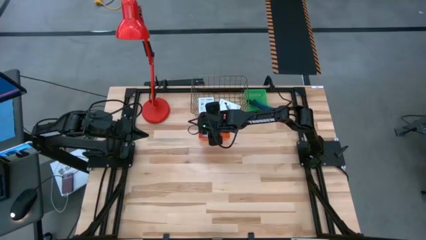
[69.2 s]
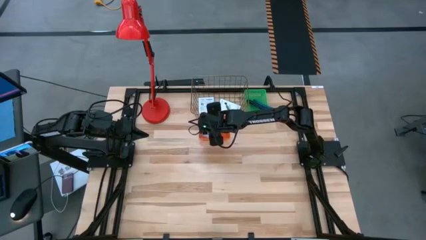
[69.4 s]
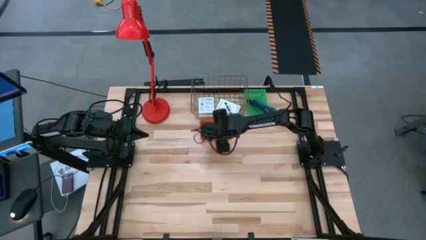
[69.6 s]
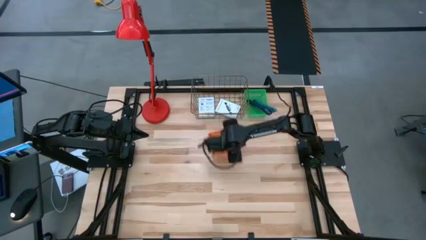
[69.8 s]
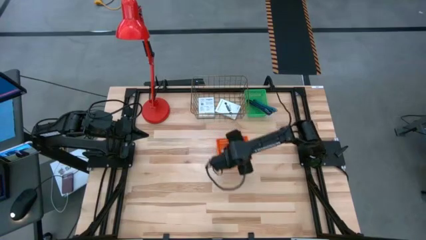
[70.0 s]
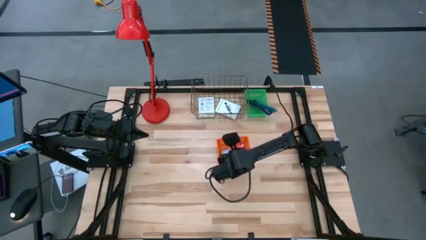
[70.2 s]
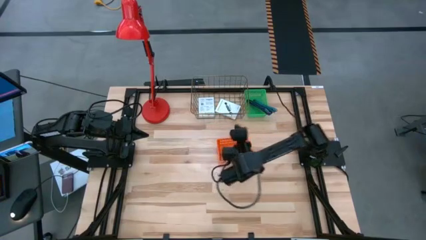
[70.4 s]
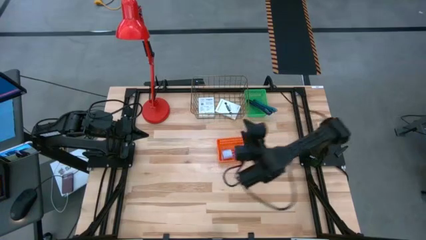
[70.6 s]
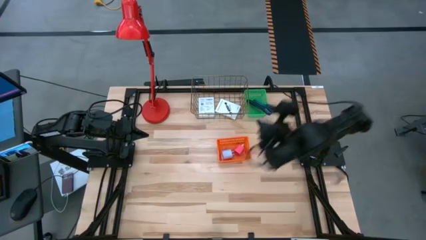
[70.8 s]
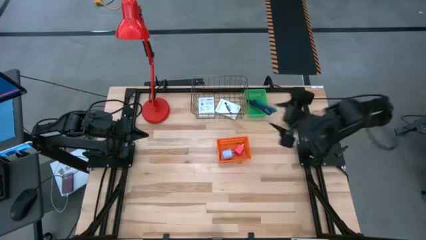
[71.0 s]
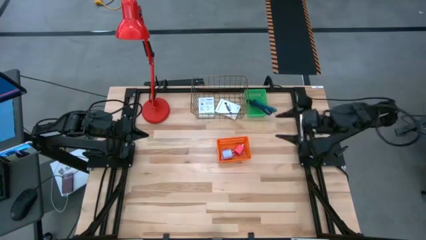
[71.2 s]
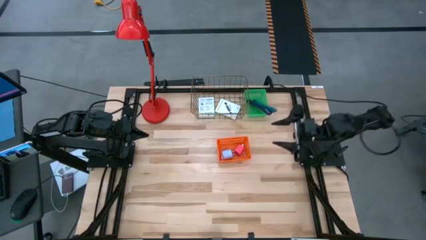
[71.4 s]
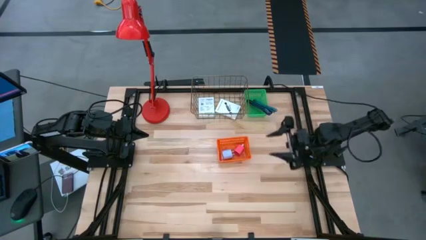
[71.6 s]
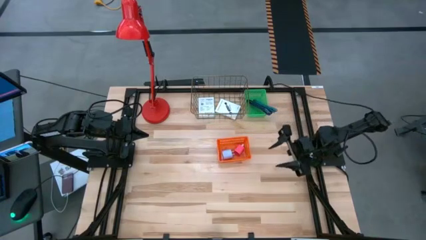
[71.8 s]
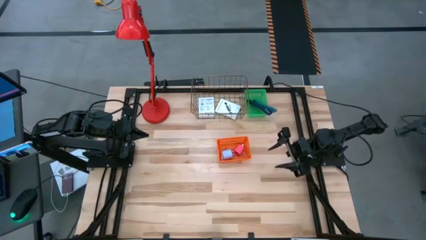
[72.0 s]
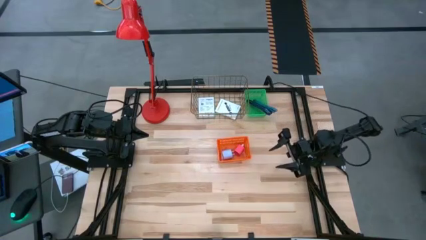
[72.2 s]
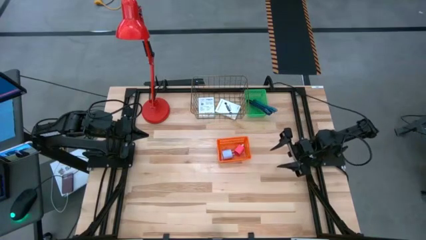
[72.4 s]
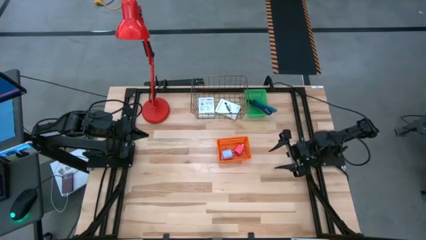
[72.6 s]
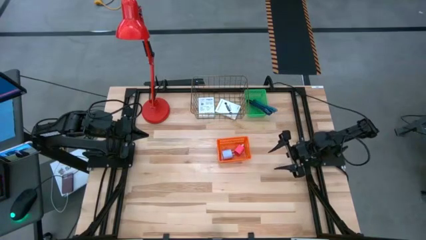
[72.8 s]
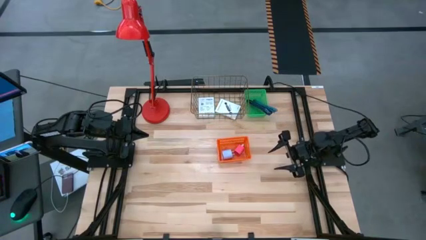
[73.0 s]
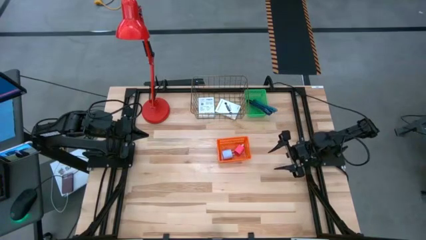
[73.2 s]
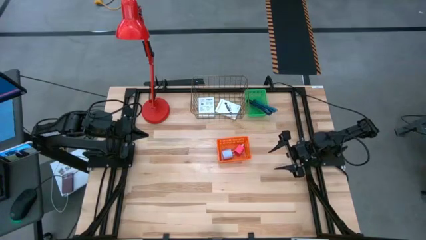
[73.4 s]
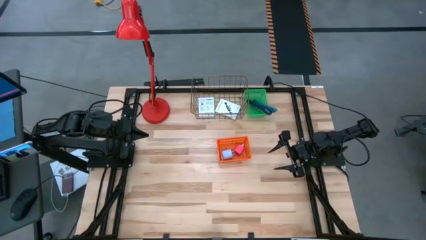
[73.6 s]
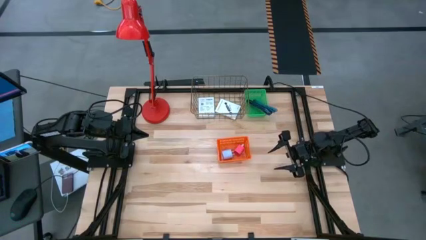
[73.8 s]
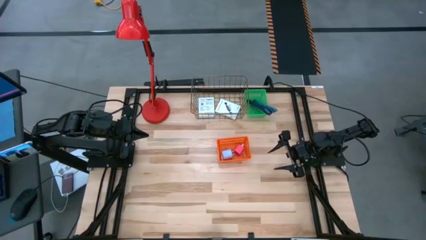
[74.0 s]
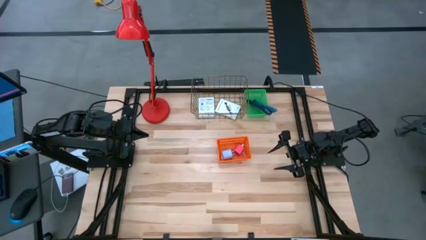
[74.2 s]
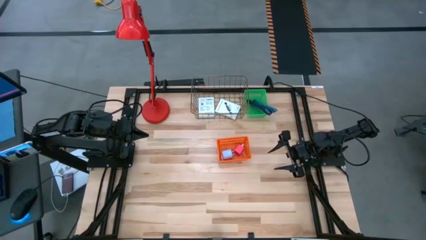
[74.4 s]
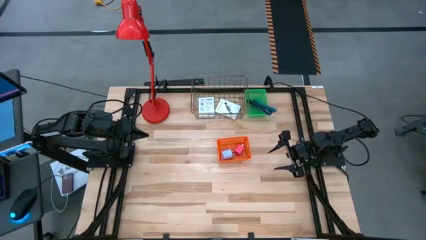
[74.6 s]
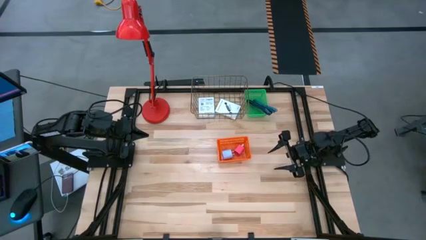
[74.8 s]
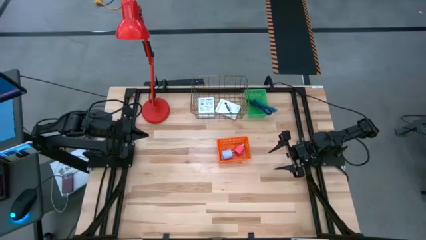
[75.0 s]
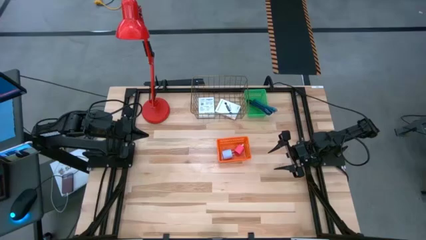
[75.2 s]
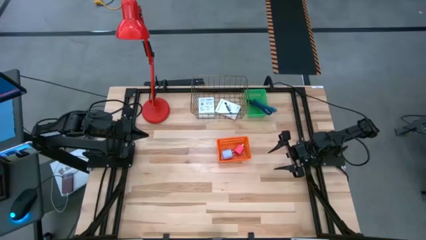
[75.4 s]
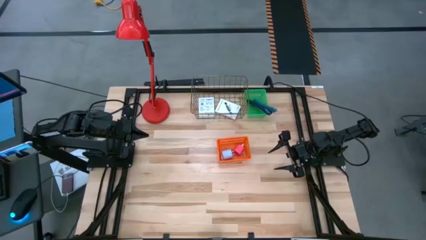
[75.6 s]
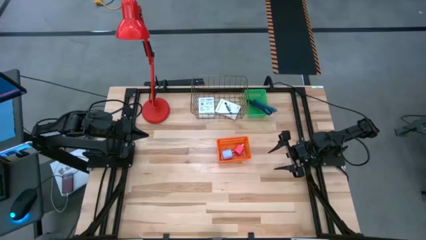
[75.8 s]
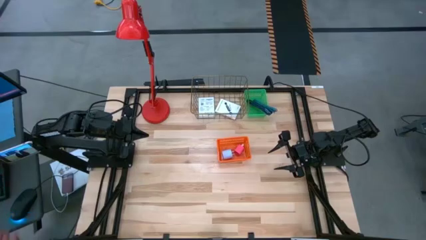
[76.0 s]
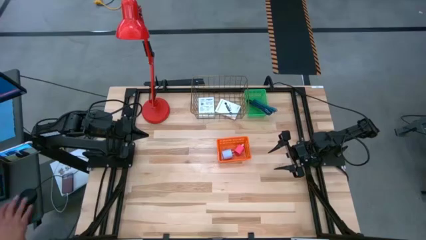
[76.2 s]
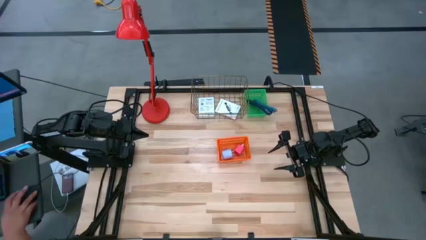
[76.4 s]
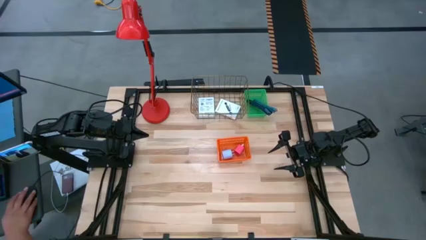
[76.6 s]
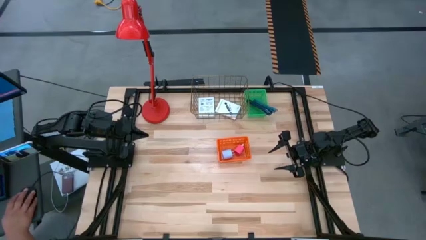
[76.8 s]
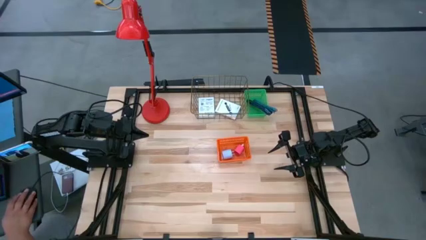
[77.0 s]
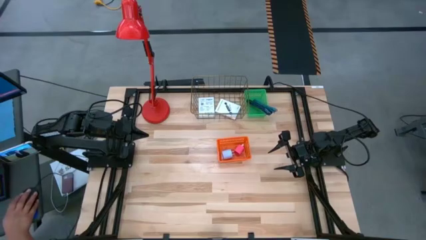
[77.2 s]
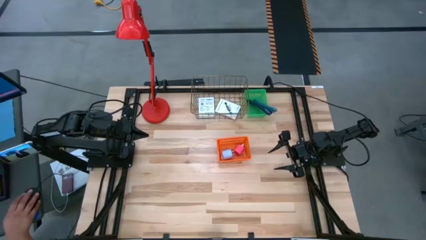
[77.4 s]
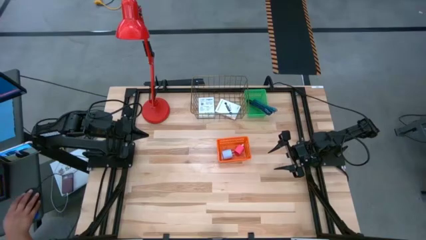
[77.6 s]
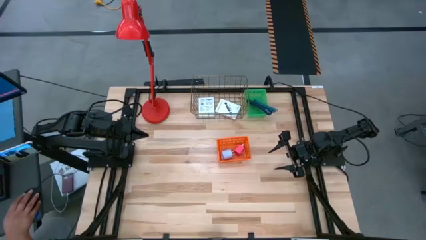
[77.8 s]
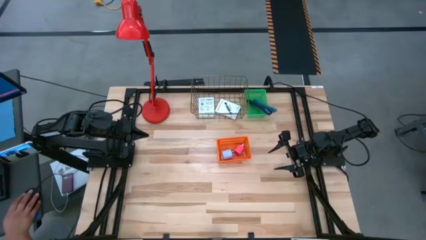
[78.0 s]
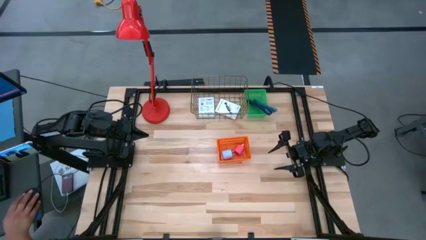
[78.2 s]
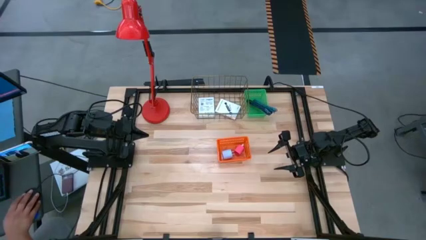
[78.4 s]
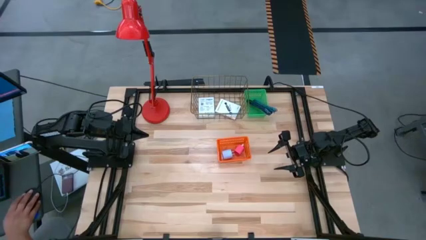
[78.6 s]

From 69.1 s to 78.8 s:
Task: Pick and place items into bin
Return to Home Position

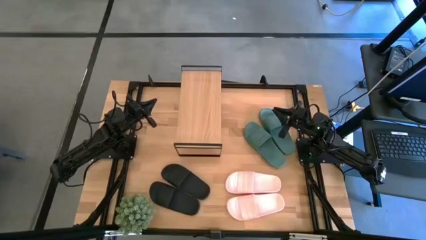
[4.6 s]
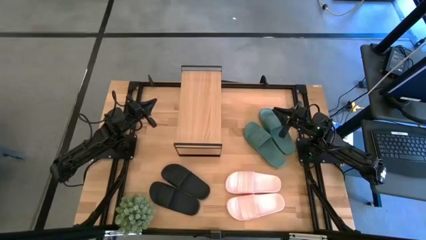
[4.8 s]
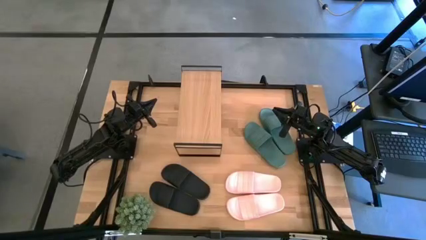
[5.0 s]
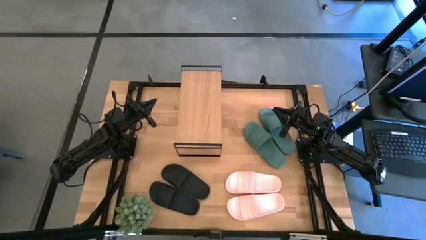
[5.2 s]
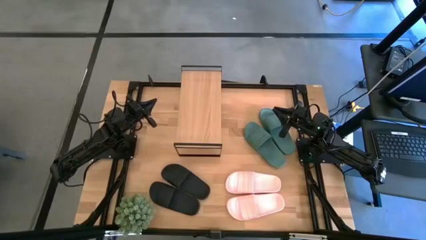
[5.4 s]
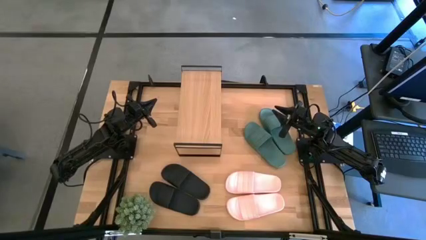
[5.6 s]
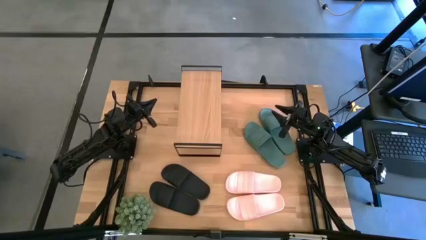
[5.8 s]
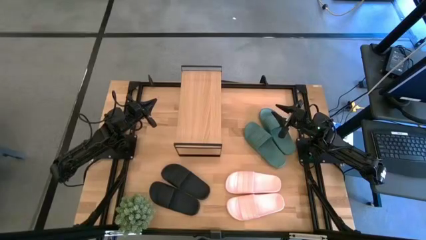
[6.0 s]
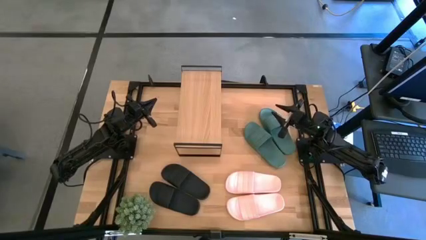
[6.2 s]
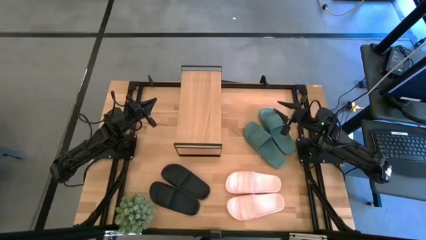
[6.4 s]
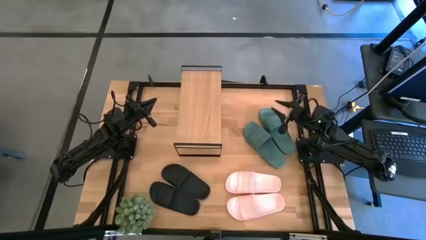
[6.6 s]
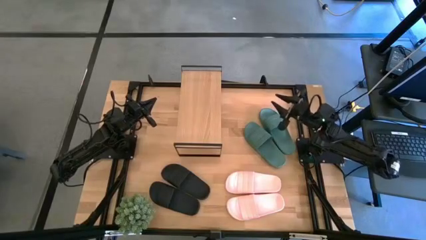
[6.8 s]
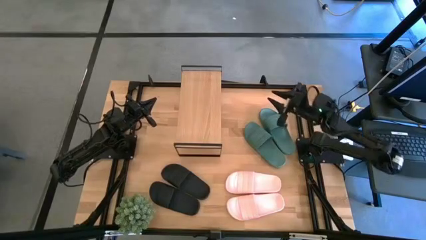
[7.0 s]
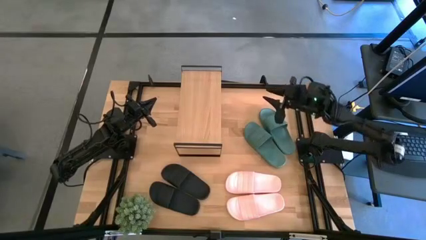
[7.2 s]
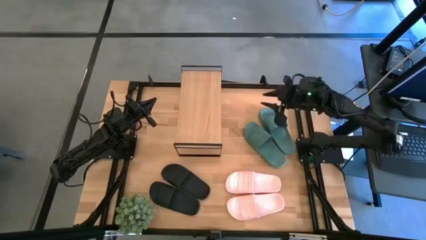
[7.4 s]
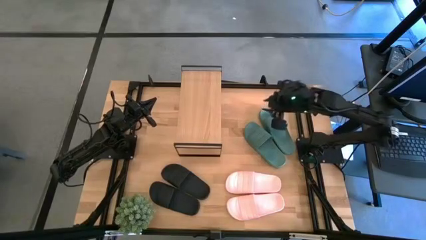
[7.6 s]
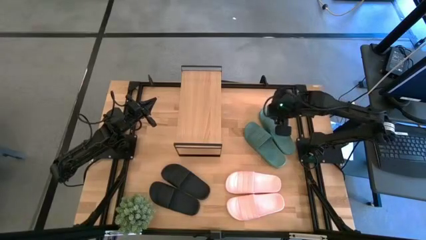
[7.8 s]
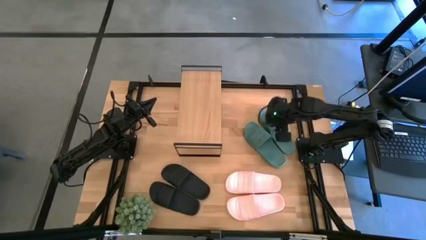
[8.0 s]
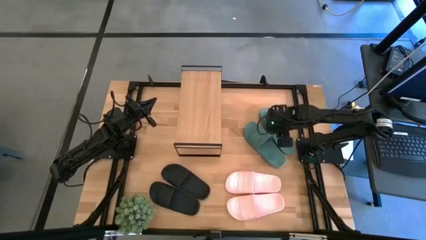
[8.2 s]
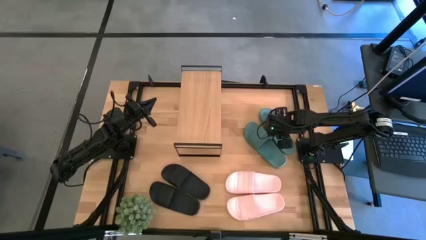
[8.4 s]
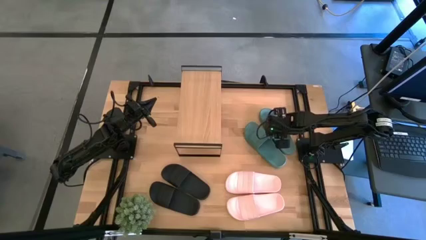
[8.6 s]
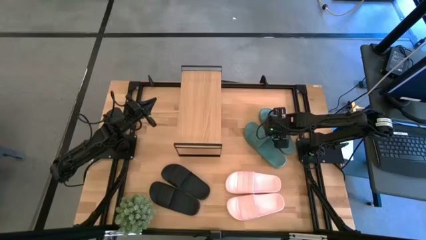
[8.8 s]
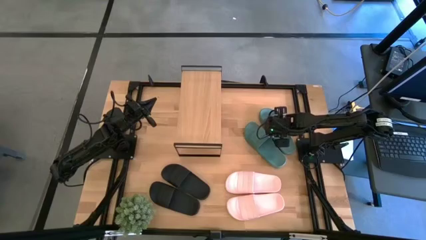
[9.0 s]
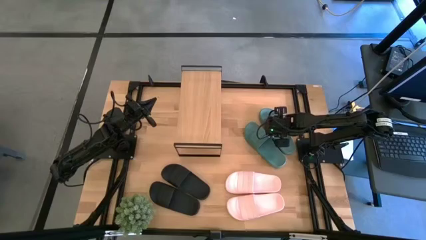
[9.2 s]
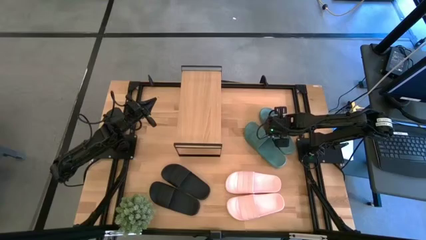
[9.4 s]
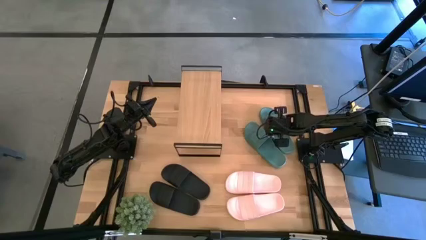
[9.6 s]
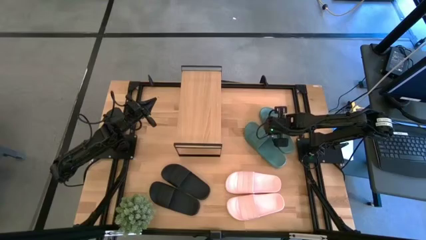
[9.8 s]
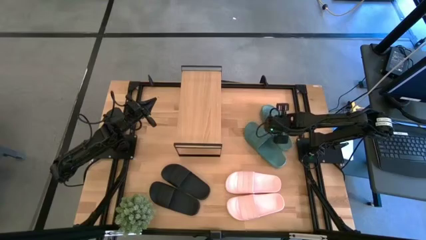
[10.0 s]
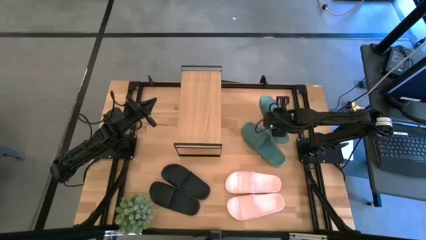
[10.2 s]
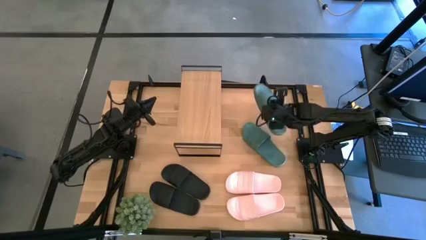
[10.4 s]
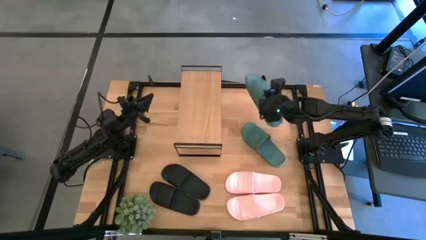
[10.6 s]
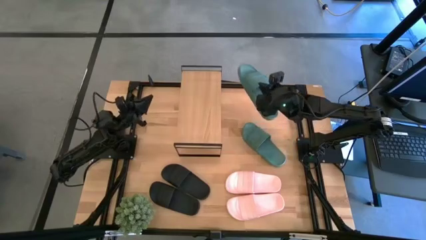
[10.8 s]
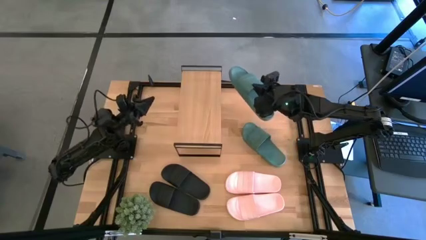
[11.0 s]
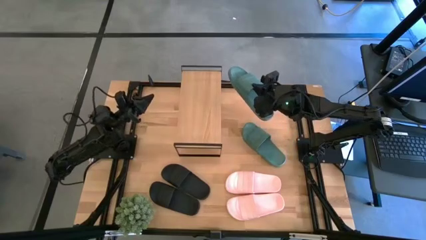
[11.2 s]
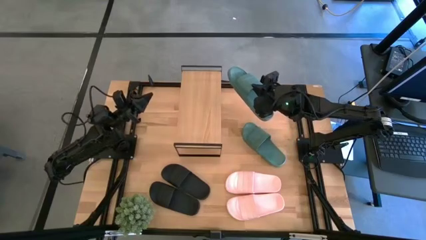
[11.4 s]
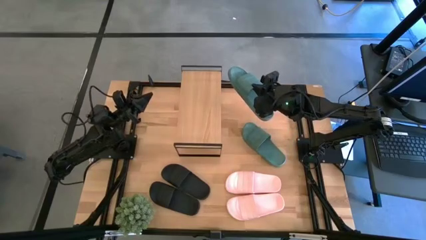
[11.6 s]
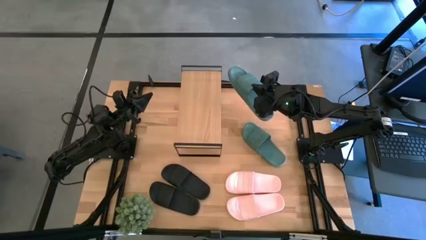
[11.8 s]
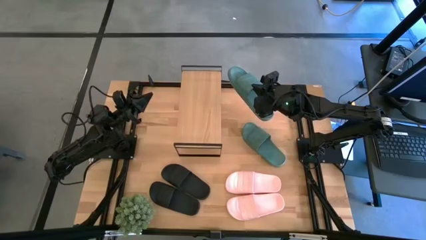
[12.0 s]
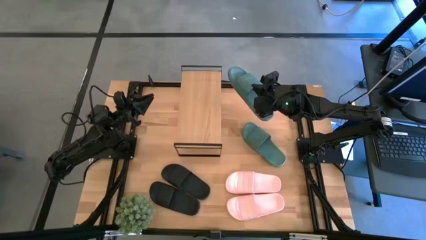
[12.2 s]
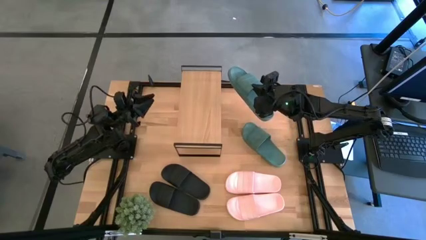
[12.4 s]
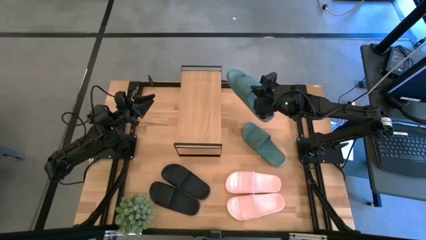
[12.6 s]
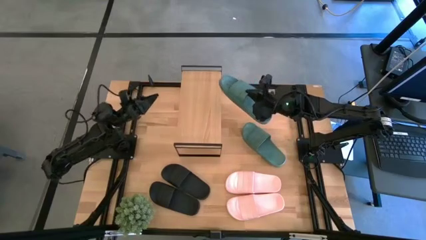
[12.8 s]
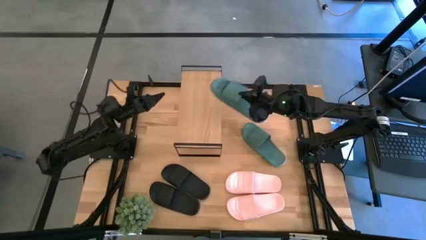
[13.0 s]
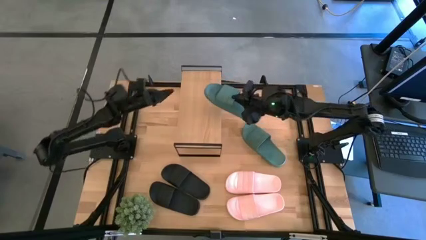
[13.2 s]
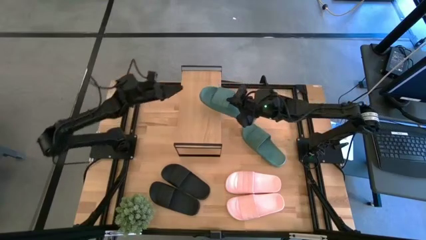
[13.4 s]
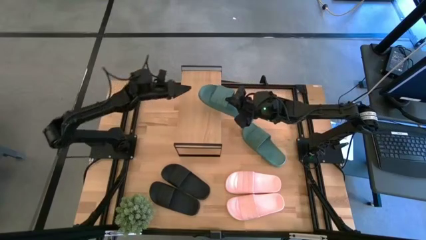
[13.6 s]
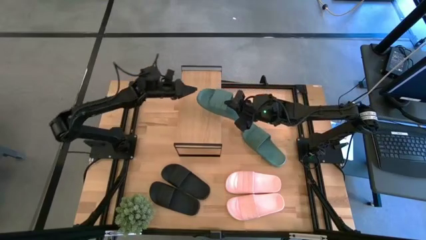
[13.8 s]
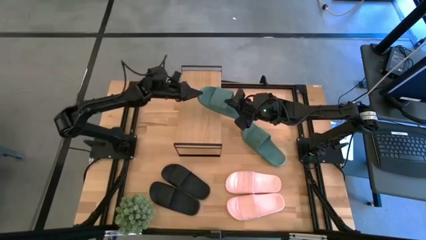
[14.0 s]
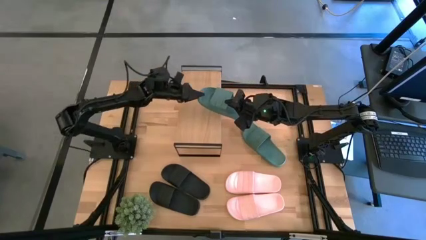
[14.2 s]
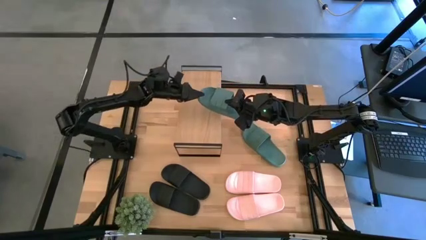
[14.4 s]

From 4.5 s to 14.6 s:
Task: Pick and place slides into the shelf
Put the right green slipper on the shelf
